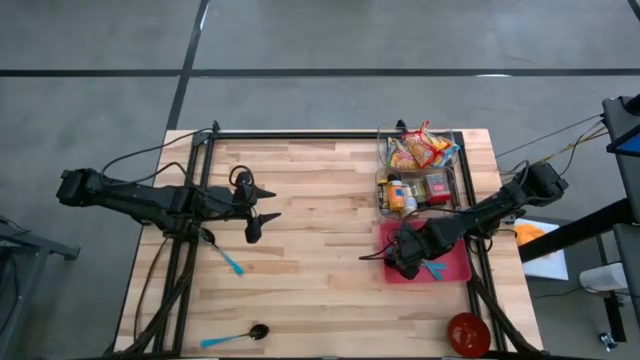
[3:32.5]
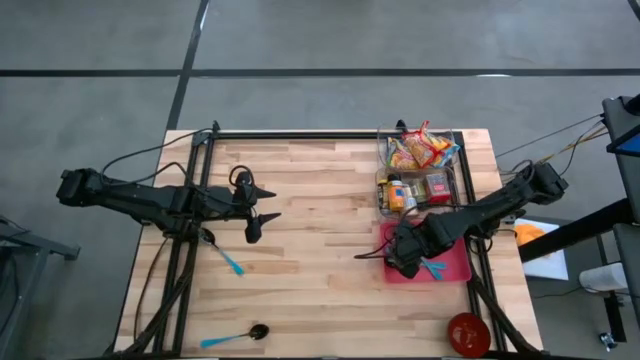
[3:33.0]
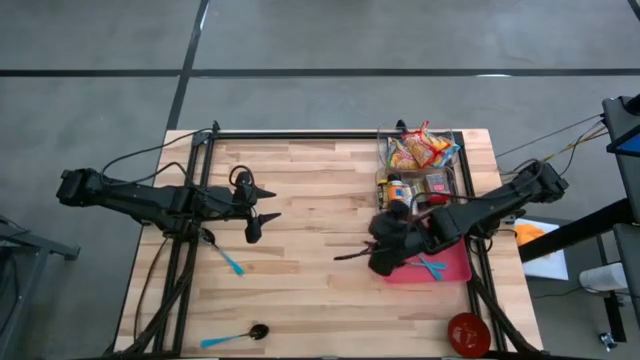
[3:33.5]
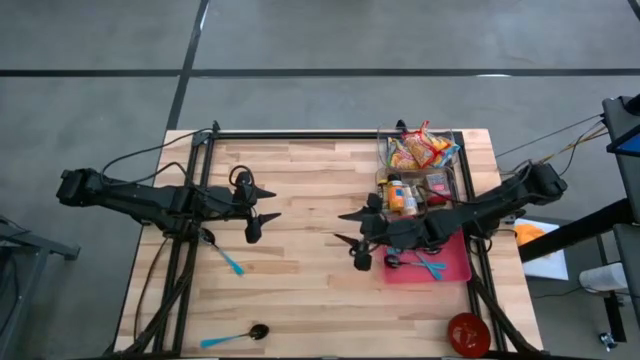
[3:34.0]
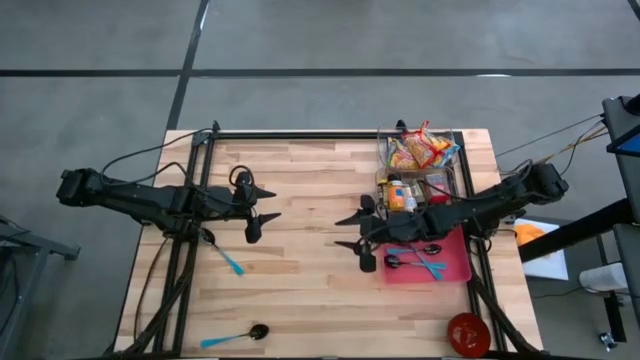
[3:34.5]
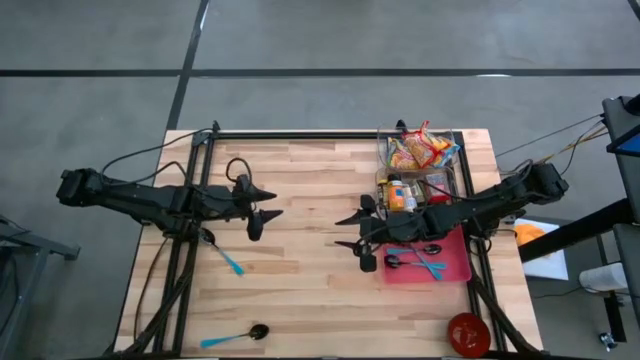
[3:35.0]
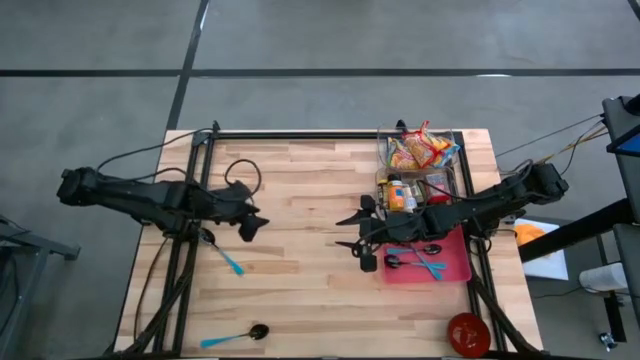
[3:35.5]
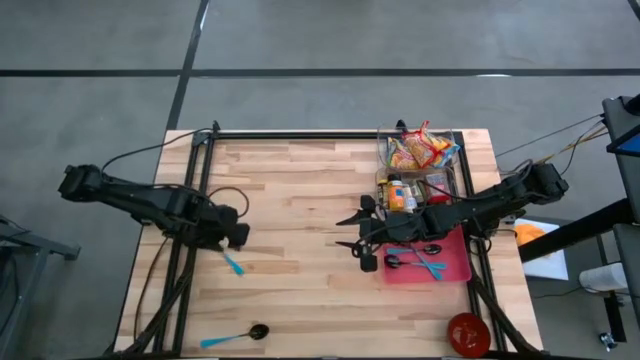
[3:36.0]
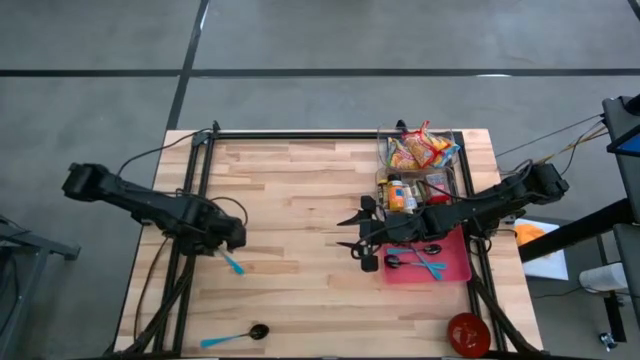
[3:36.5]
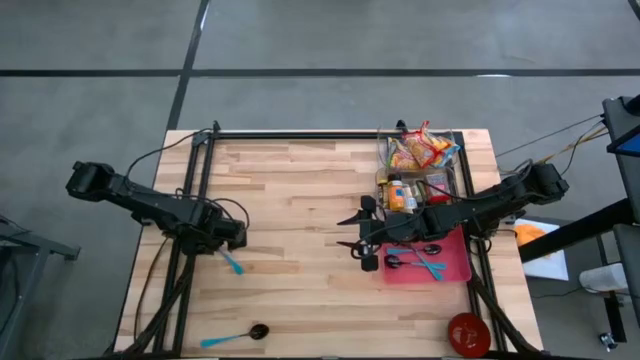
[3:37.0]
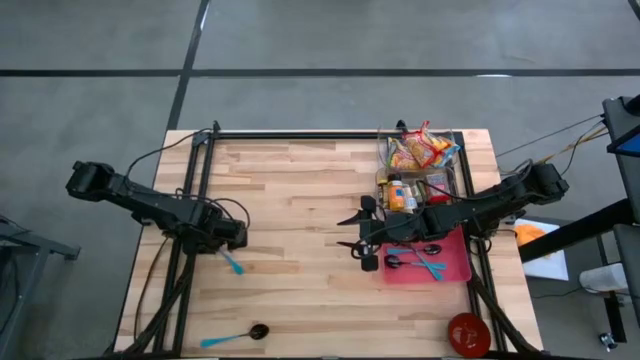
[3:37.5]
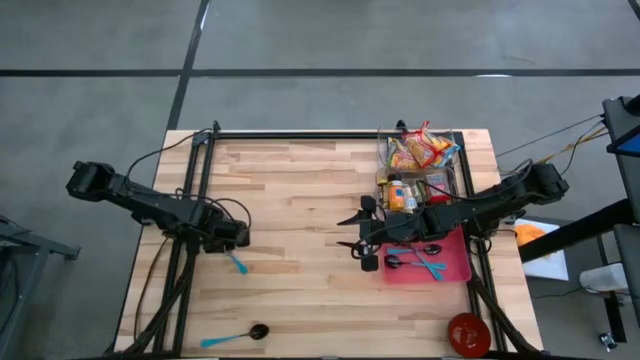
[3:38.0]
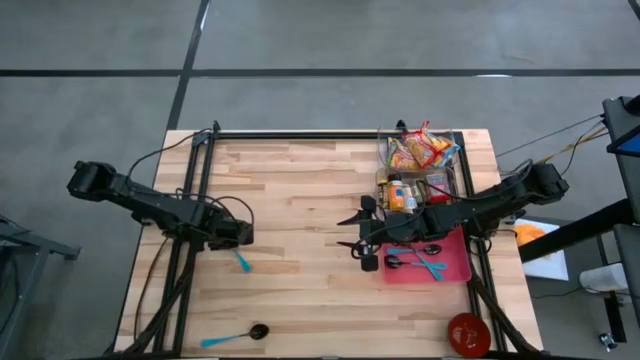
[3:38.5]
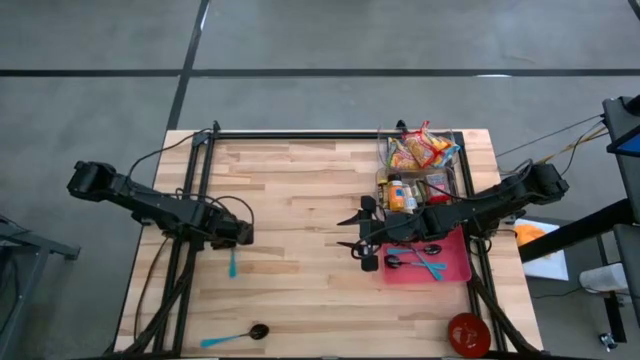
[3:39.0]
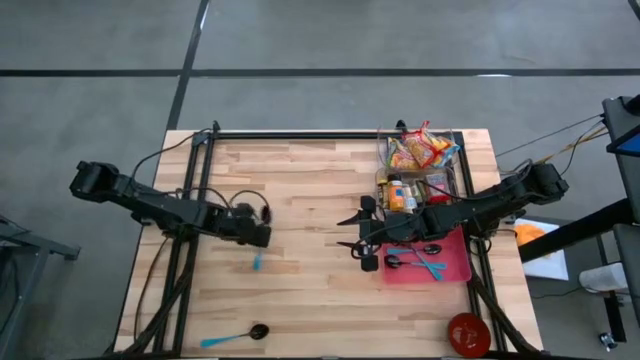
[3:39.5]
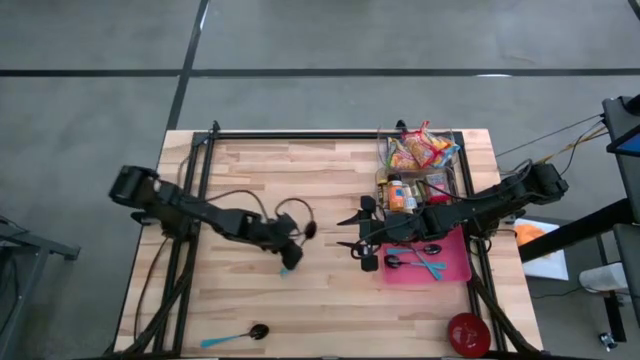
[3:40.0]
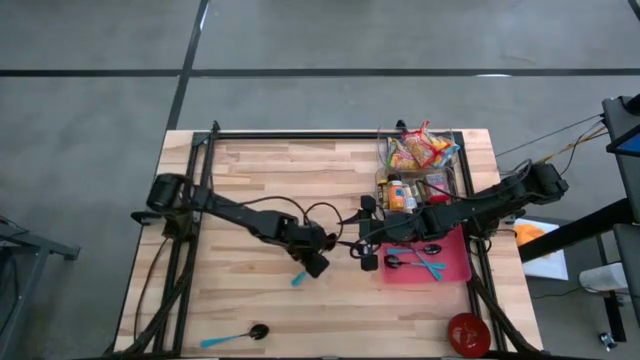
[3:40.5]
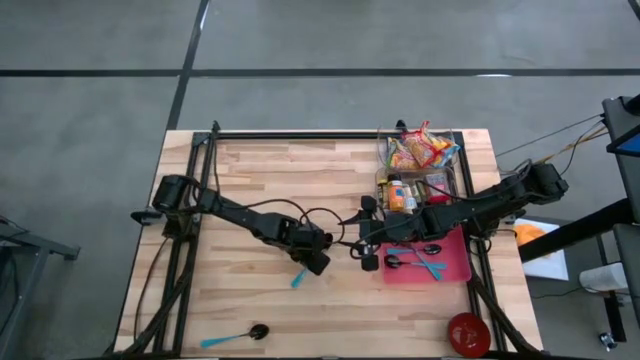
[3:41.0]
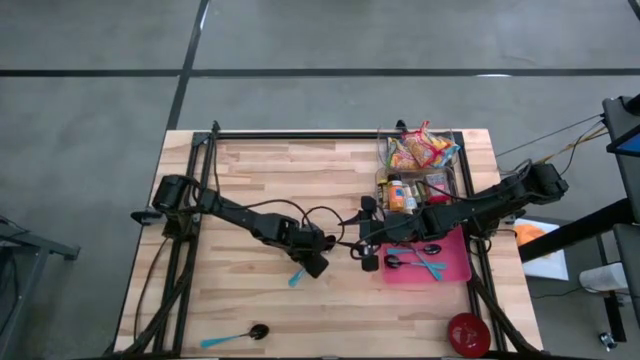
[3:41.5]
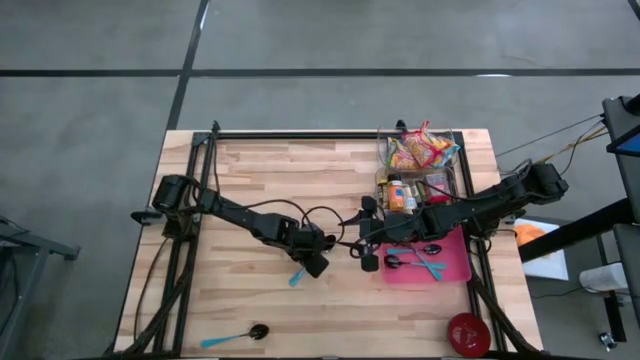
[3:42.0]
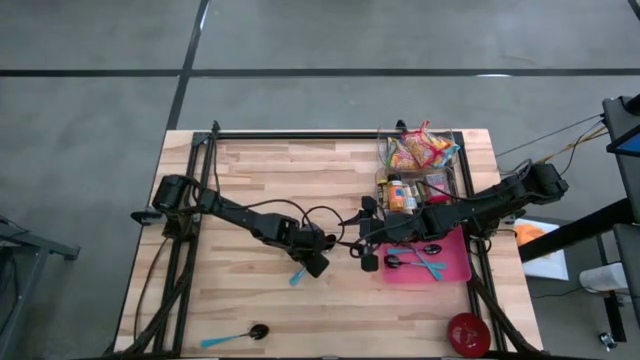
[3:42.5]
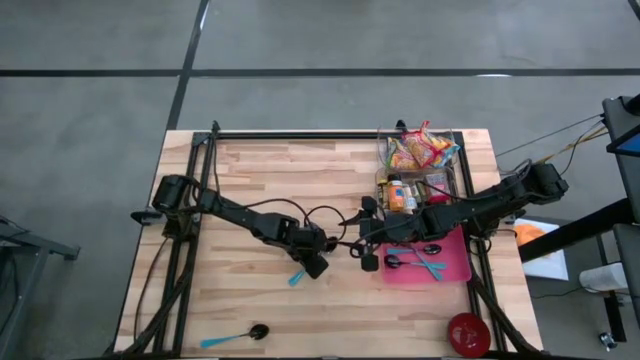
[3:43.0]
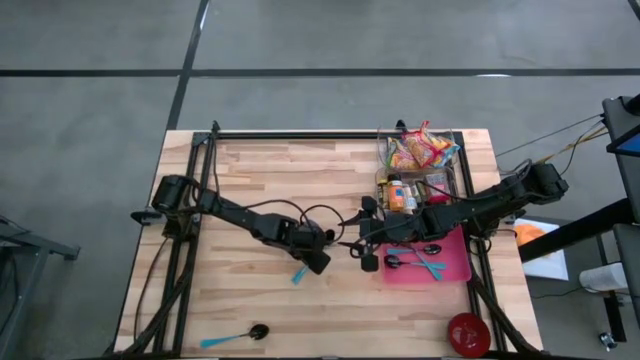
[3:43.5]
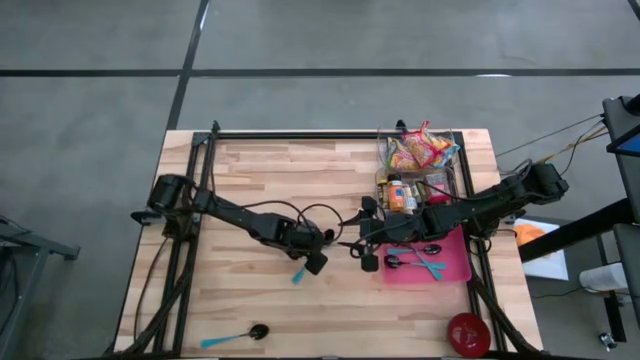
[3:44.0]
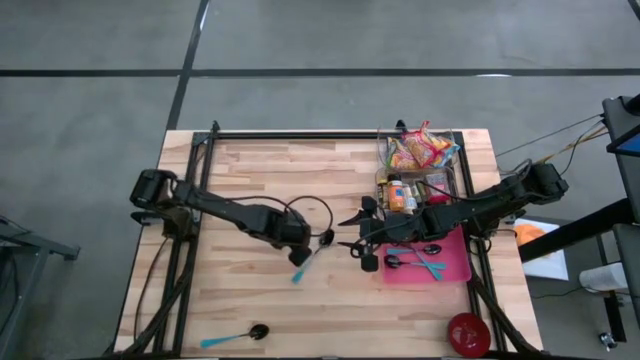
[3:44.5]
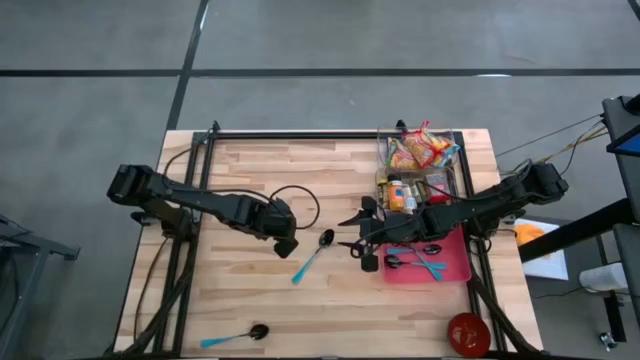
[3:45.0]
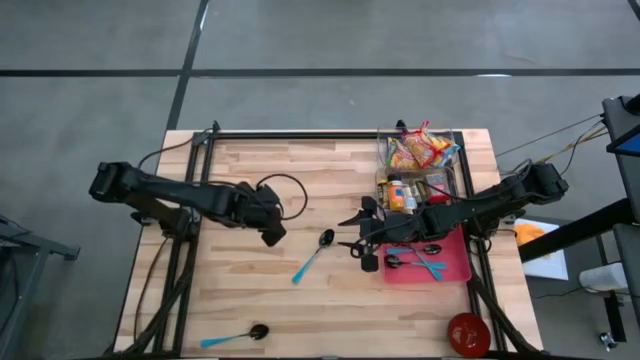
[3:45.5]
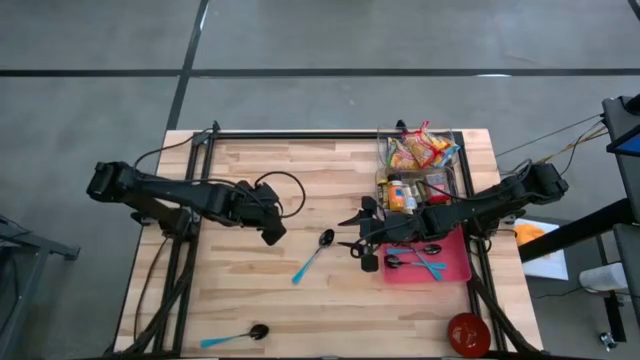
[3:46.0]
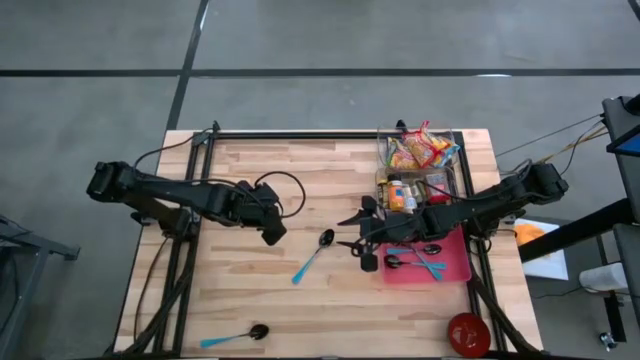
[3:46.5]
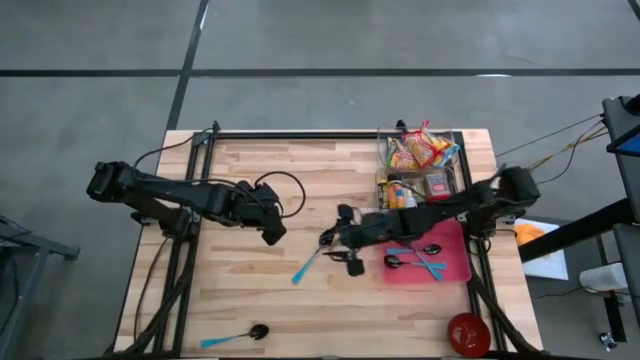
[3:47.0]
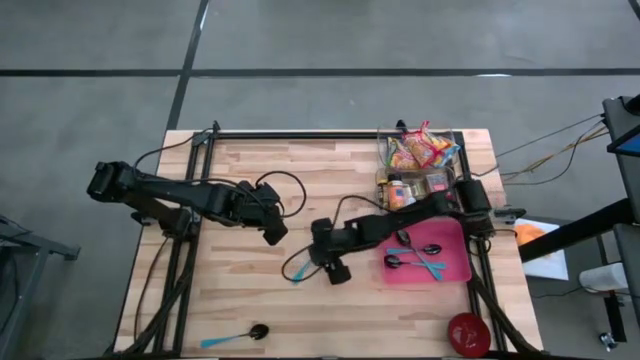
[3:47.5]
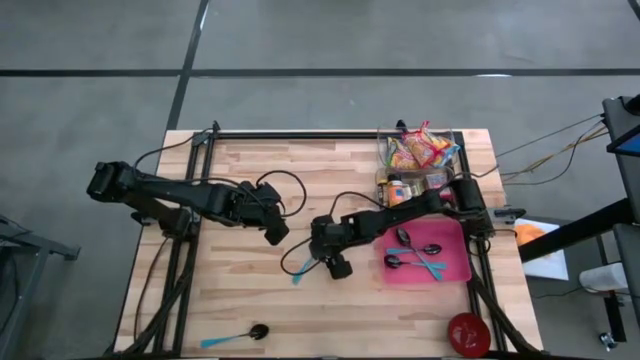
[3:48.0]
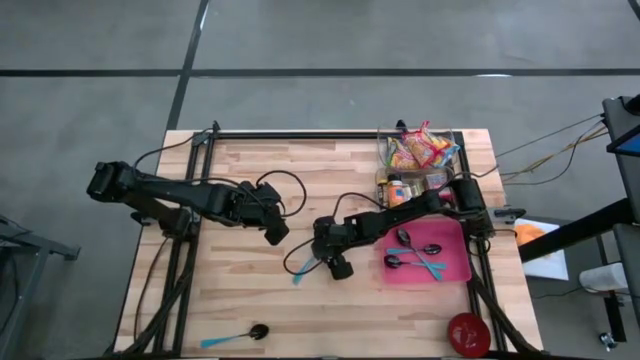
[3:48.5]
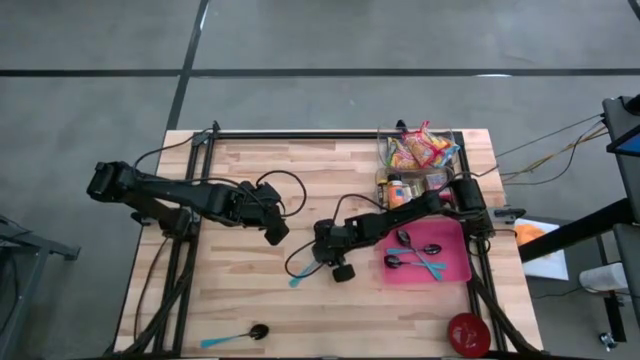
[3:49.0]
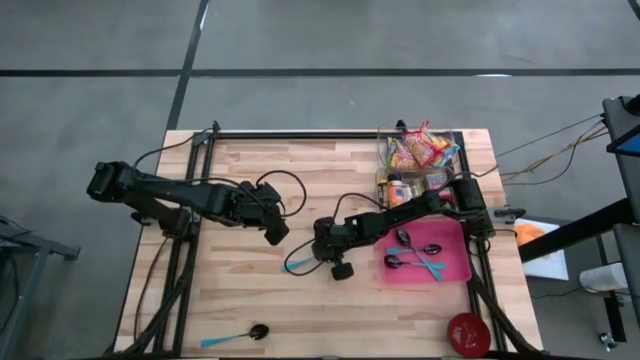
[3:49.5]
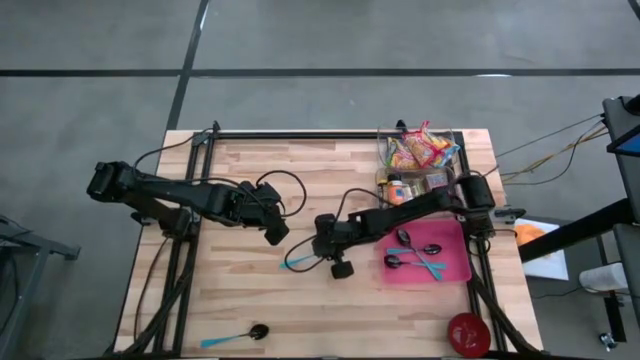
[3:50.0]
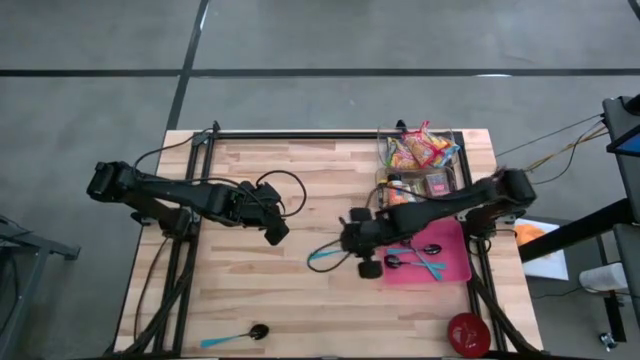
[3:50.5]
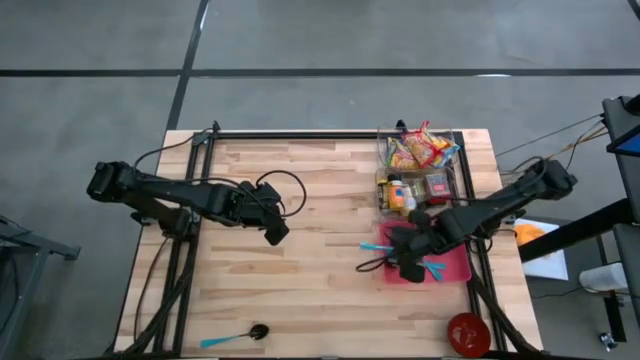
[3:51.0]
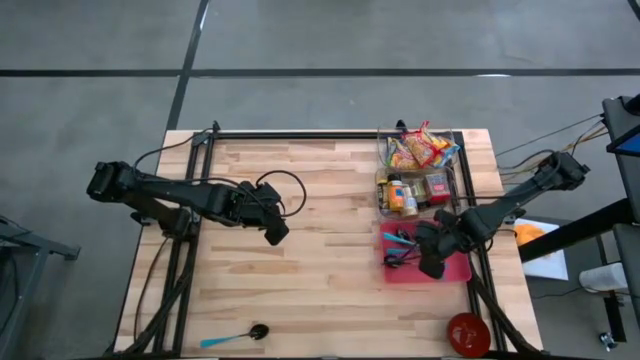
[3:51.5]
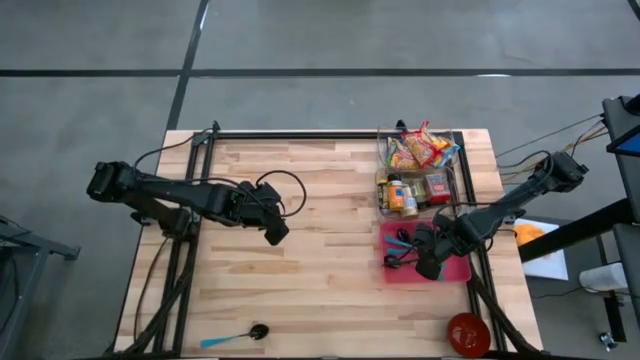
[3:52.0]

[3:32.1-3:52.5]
Put the blue spoon into the red bin
